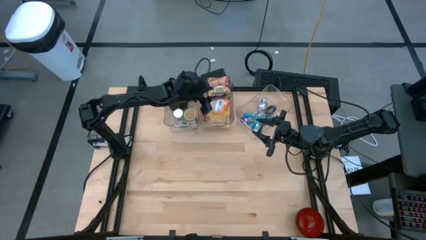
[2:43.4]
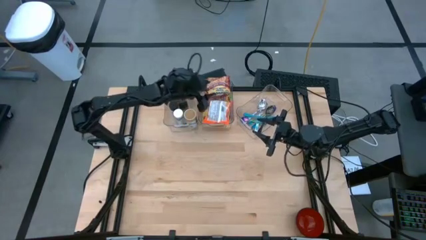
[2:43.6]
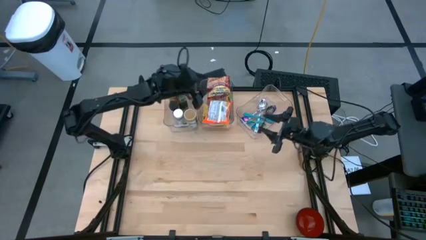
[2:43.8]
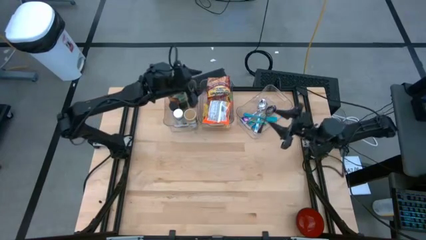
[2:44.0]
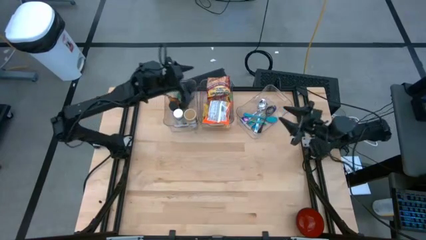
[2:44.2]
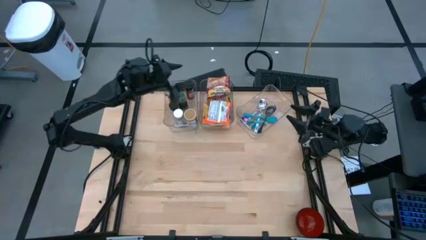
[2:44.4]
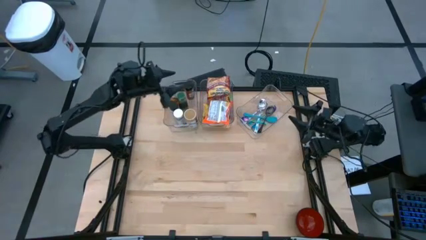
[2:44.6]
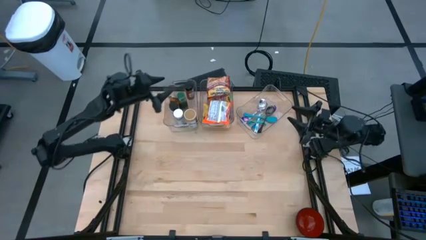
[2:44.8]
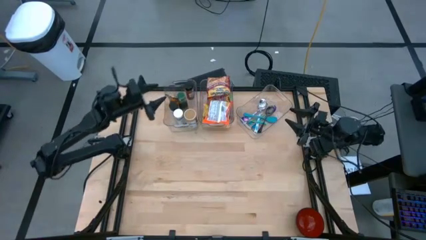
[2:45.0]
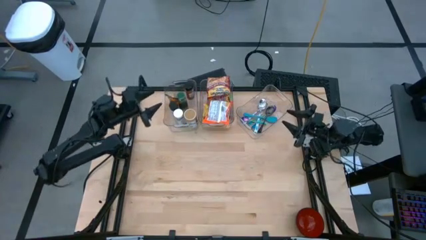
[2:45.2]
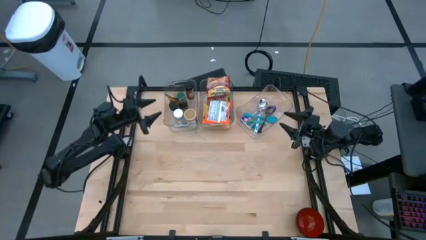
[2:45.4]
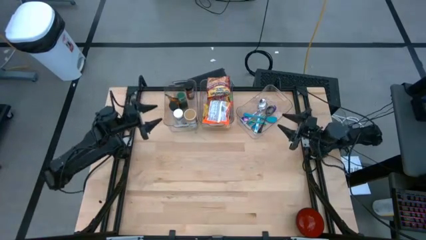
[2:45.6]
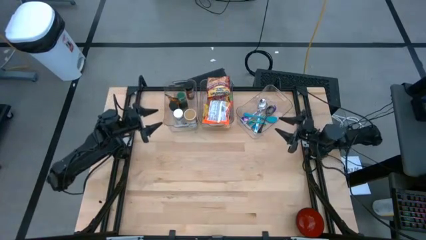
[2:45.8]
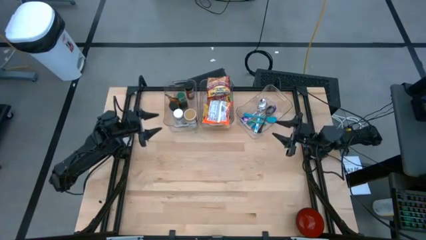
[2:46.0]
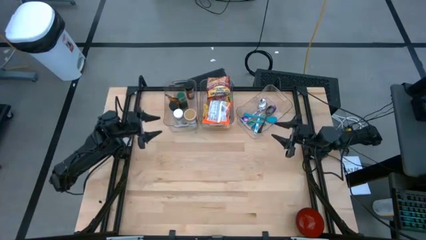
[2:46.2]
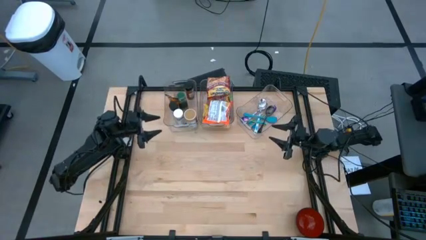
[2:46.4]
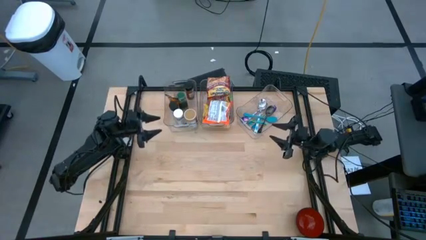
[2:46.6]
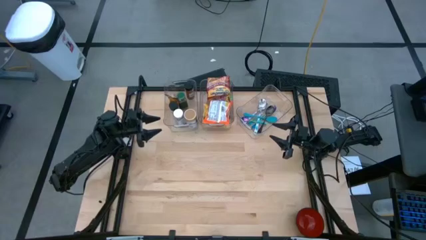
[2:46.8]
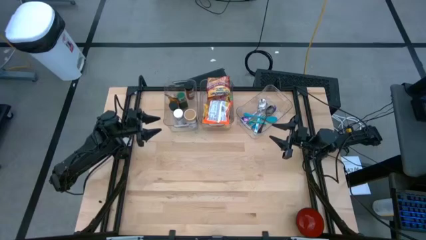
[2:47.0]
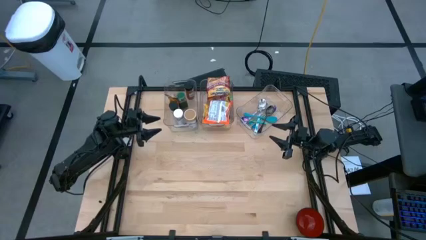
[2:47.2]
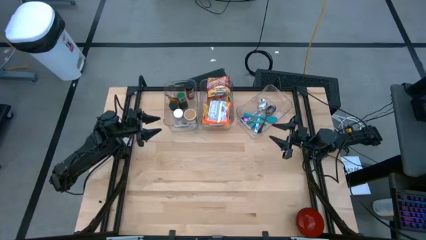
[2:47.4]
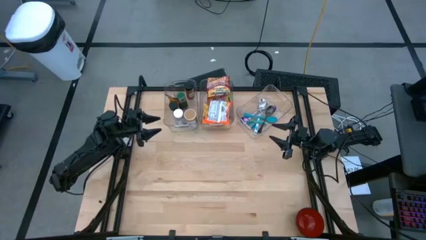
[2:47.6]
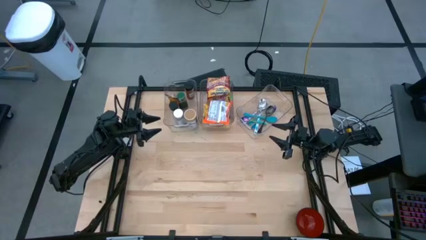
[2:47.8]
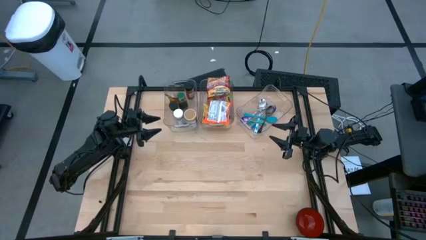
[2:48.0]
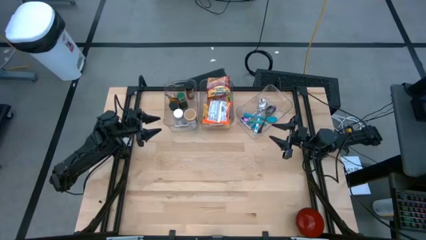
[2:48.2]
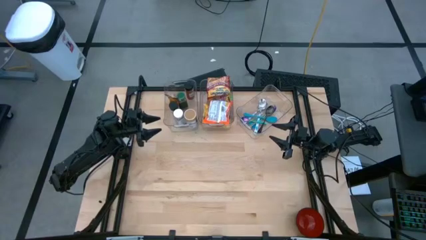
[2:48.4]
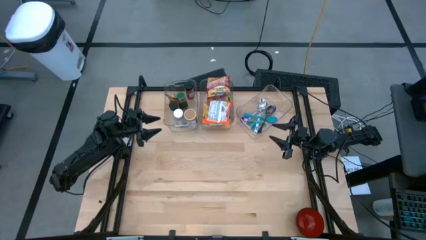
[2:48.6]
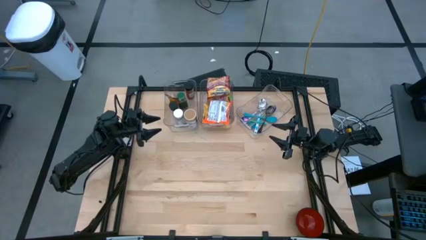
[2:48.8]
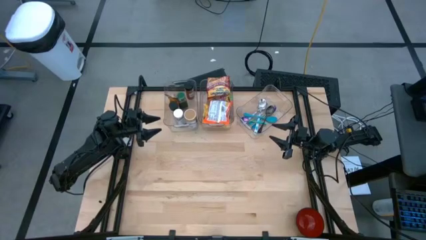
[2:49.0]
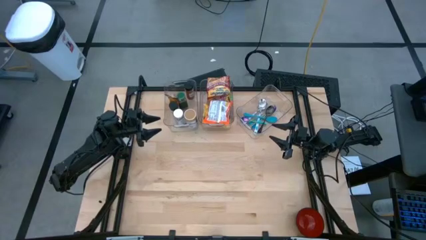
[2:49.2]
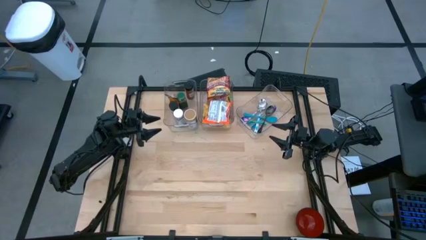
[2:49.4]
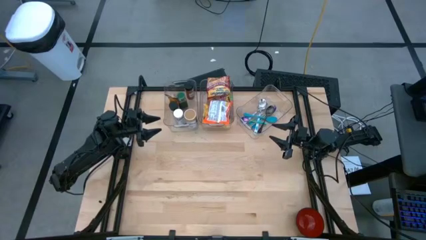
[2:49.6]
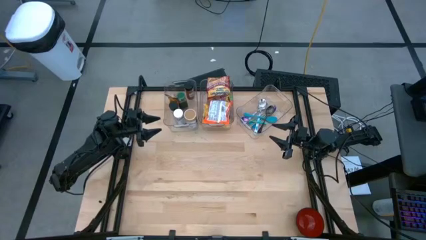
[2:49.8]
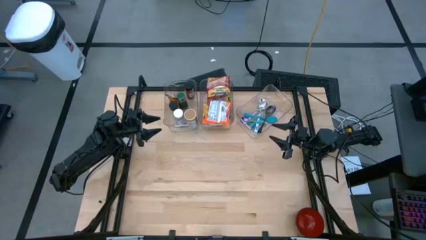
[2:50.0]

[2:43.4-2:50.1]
Task: Pick & Place Food Item
Return to Home Position

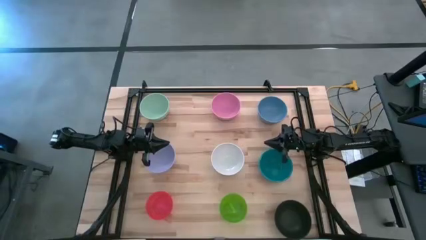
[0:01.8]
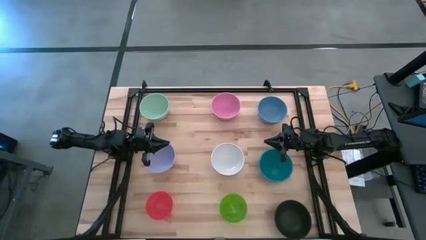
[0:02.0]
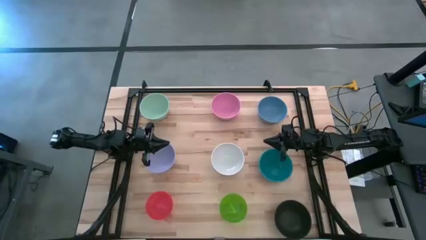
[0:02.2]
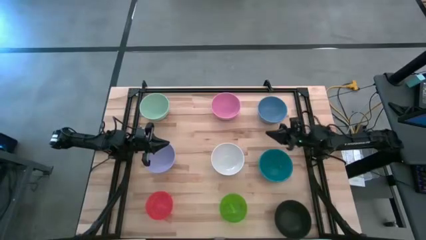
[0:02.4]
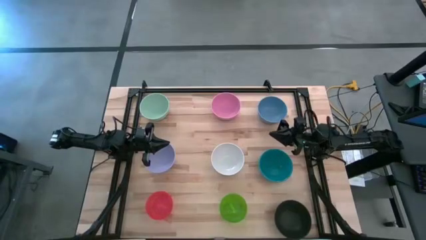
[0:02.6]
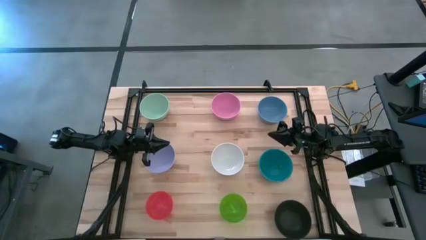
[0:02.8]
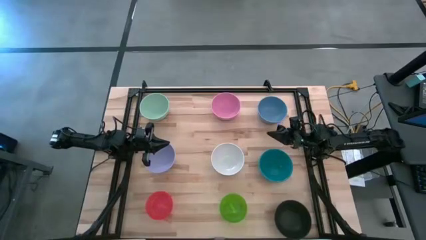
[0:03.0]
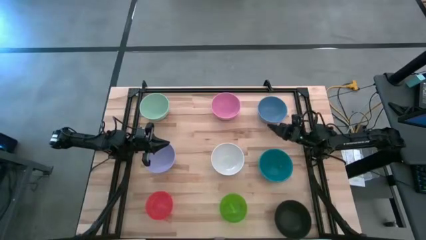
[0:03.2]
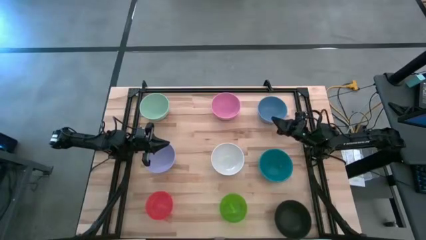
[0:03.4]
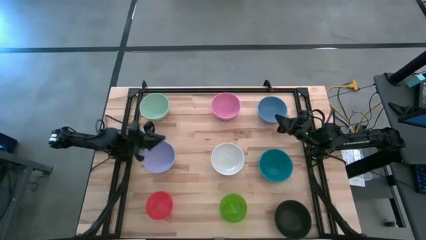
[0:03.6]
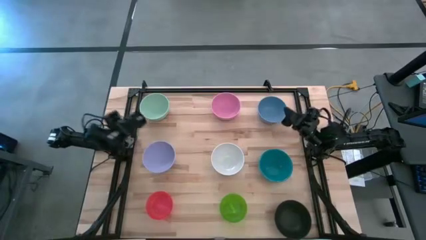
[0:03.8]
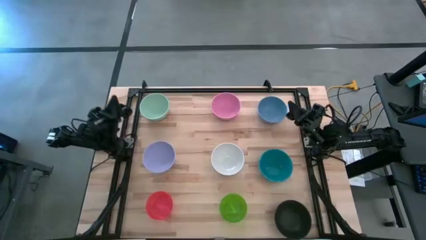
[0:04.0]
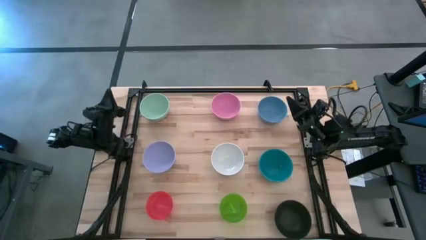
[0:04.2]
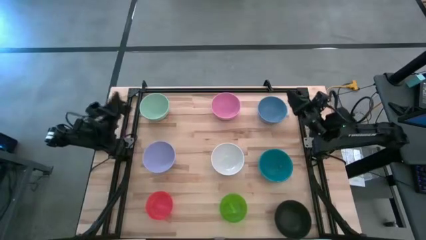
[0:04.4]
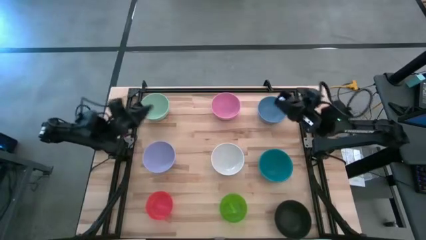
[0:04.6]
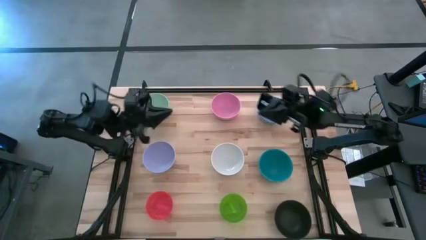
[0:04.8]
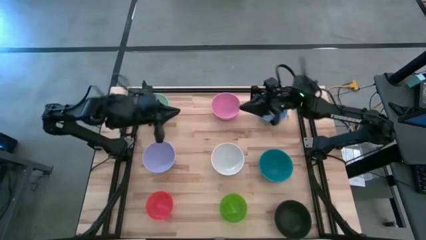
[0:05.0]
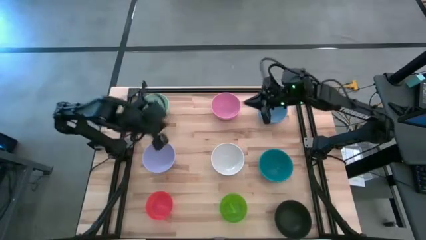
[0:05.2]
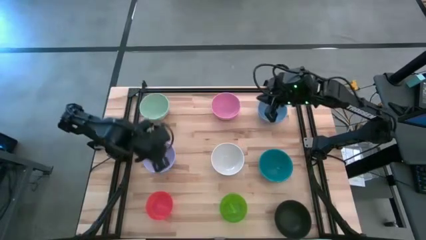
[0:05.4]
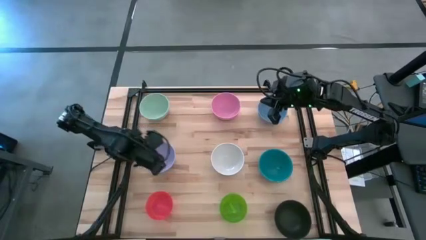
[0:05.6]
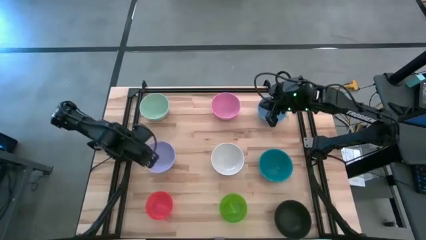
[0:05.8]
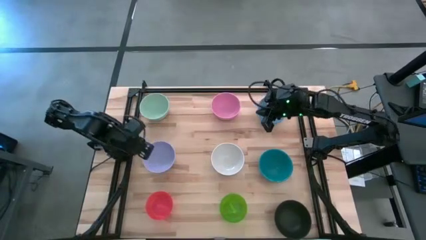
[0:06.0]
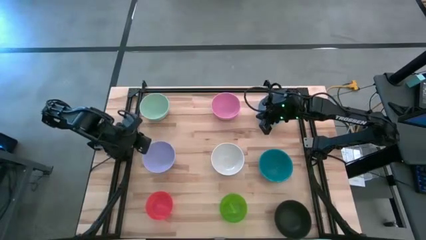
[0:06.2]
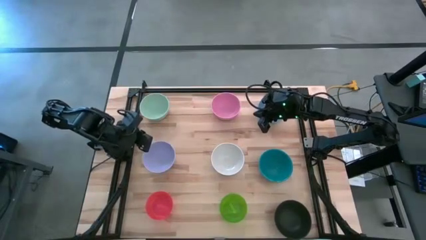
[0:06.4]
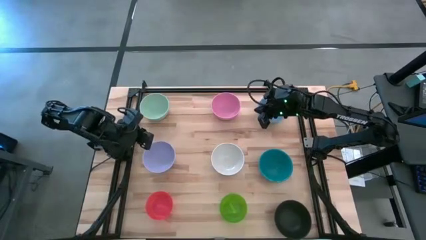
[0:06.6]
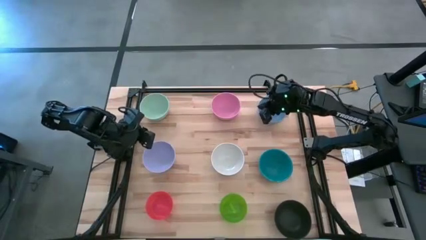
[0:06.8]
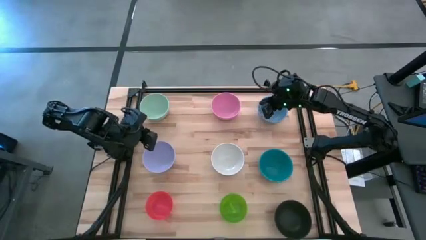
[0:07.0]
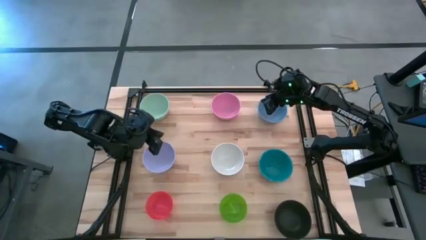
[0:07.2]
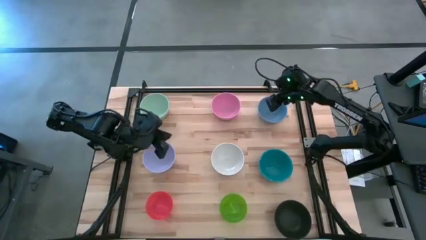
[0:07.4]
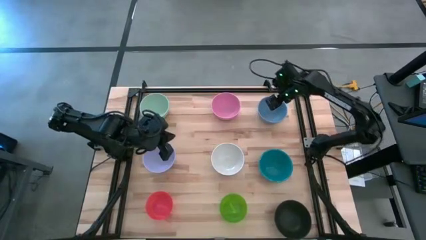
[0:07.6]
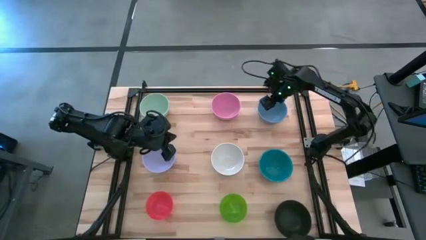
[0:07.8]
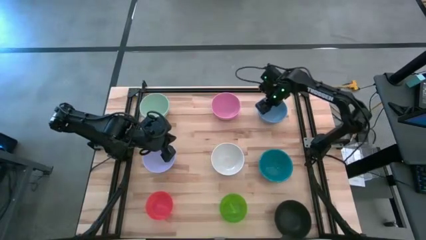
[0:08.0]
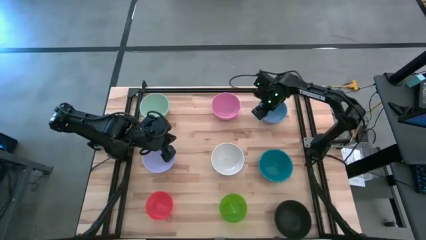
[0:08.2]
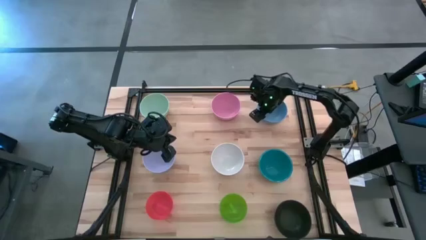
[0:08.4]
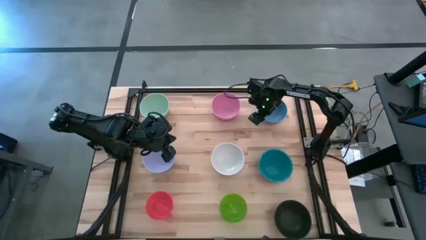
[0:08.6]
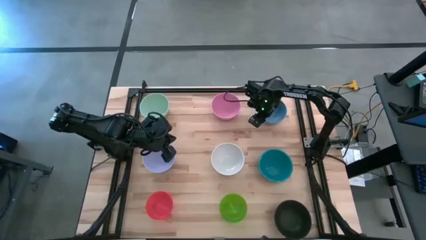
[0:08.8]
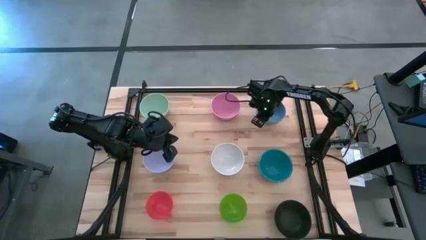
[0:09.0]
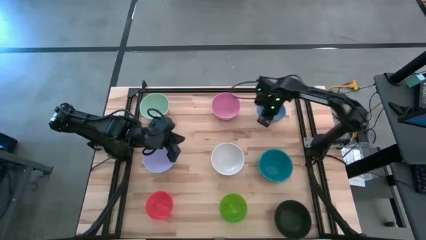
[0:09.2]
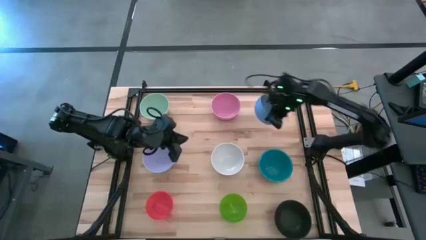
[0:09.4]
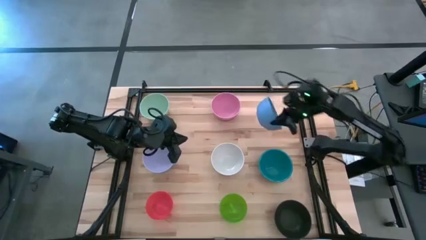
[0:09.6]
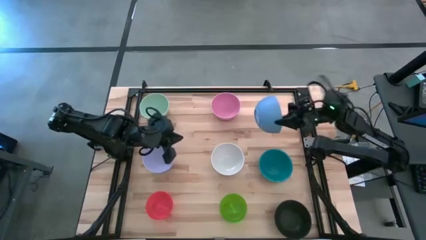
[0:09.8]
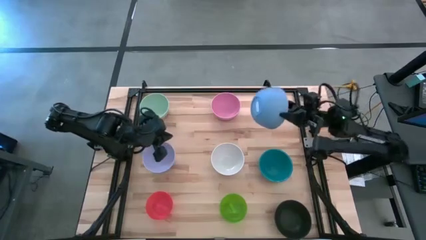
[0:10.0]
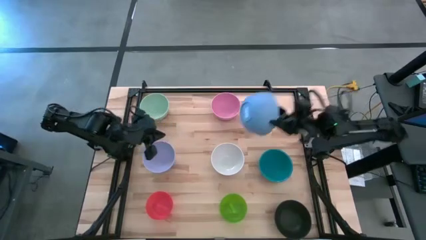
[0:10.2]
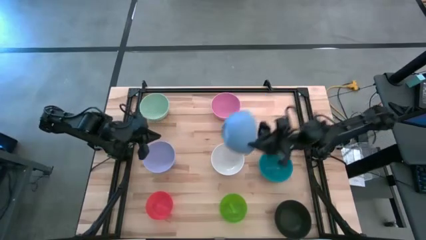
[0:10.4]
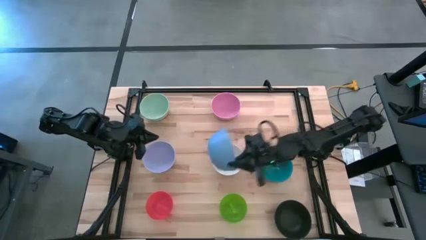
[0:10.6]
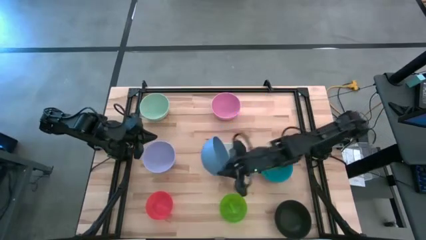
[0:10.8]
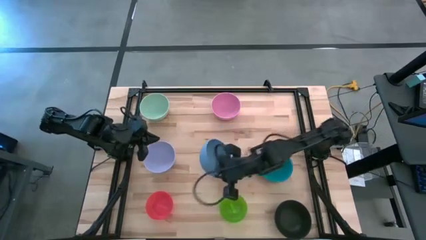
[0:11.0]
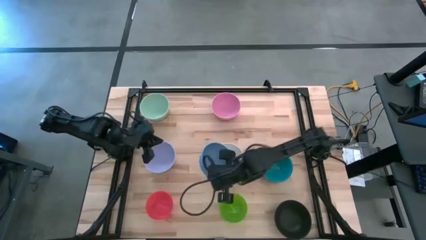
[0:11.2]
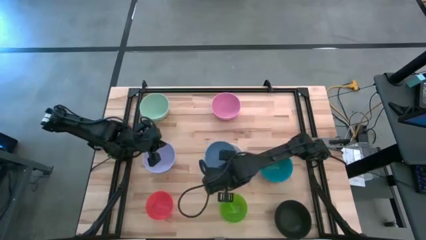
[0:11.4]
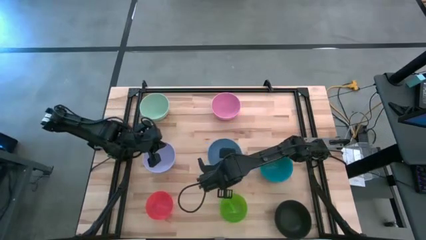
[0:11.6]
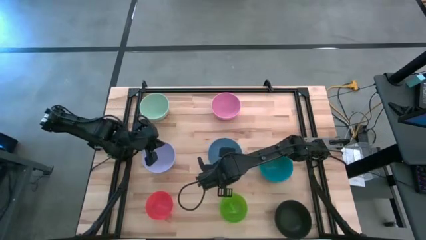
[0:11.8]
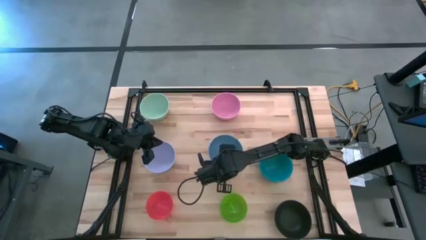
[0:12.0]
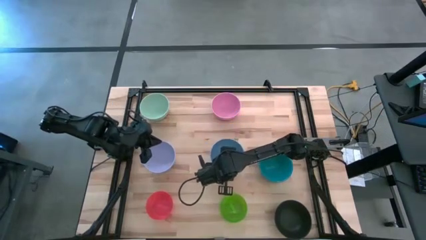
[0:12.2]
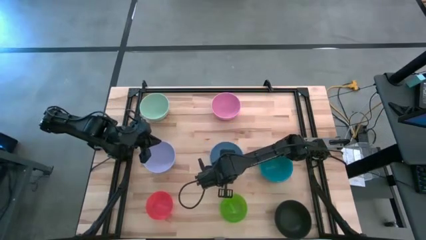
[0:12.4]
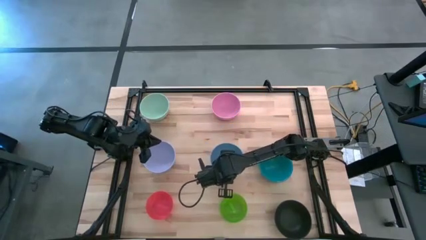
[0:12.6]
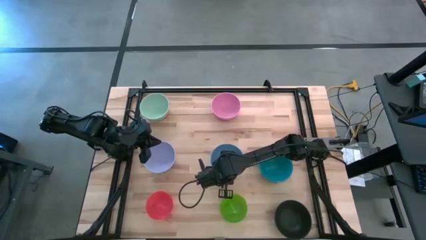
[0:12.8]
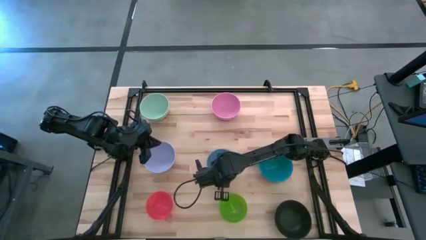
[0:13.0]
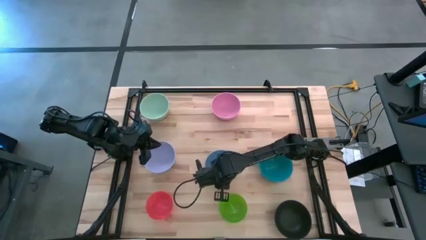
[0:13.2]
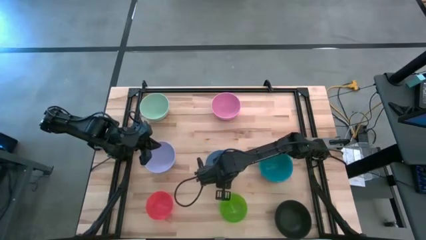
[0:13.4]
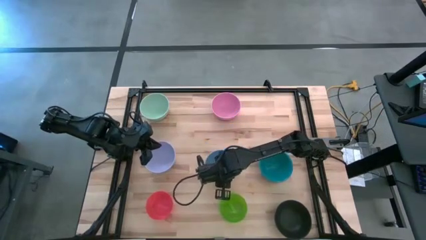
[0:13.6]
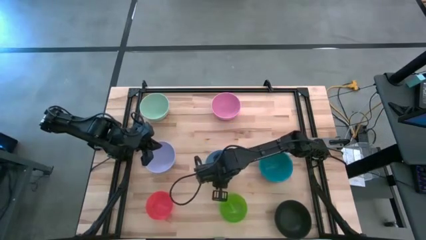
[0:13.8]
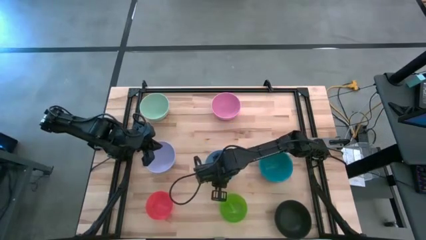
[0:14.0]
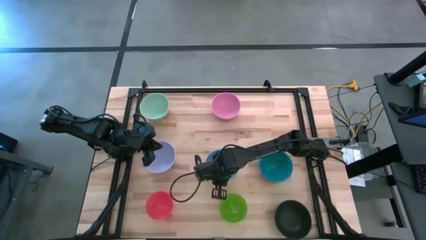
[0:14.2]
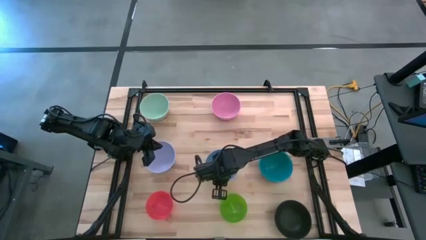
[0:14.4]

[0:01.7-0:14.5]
Task: Nest bowls inside each other
Stack the top light blue bowl on top of the white bowl
